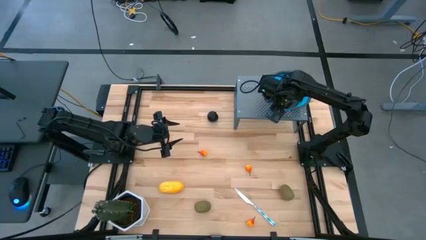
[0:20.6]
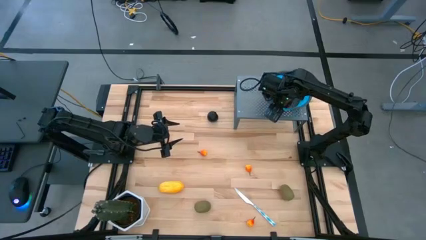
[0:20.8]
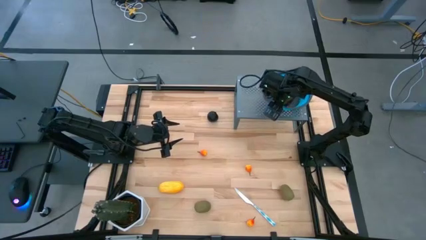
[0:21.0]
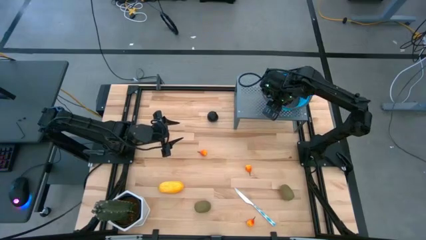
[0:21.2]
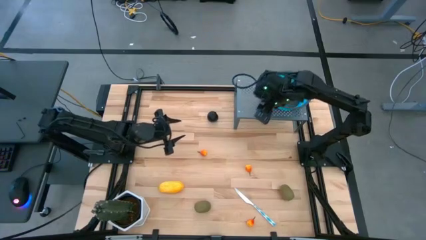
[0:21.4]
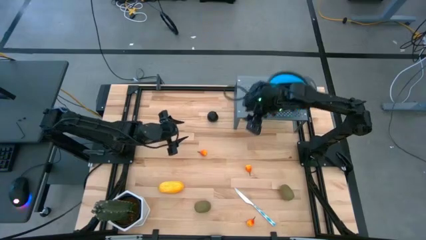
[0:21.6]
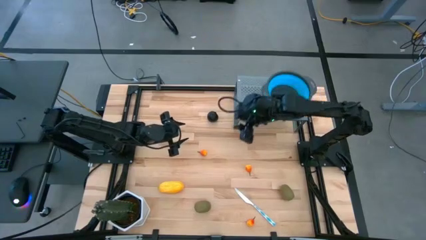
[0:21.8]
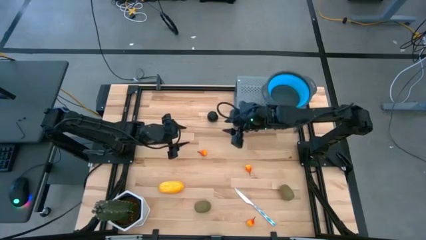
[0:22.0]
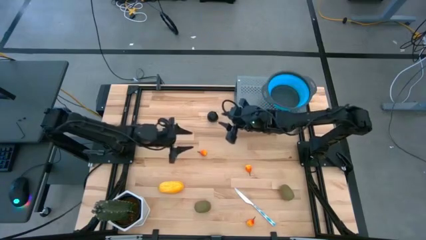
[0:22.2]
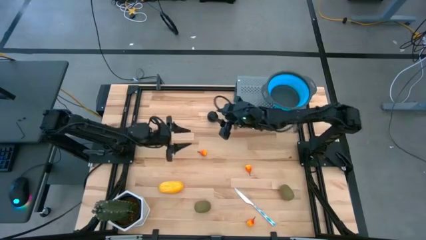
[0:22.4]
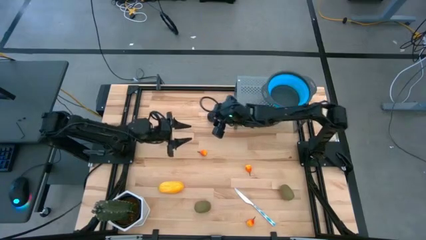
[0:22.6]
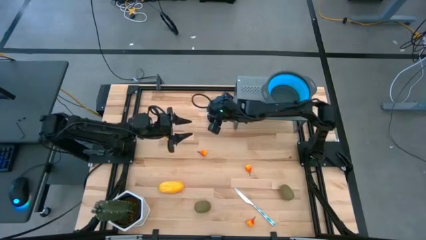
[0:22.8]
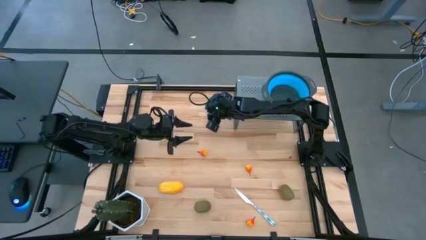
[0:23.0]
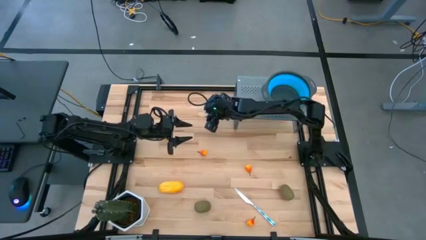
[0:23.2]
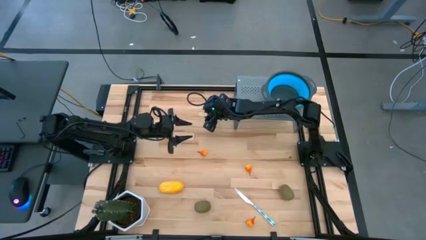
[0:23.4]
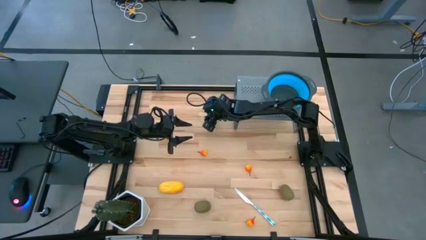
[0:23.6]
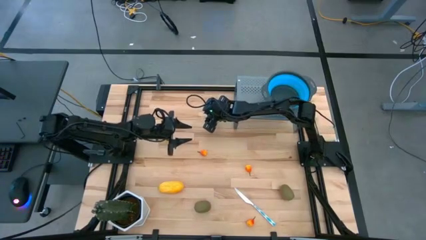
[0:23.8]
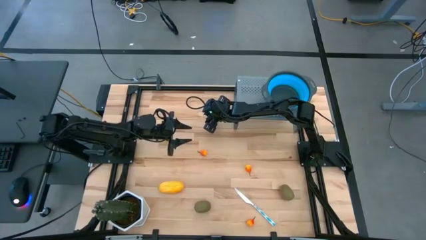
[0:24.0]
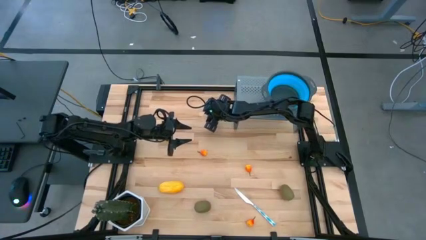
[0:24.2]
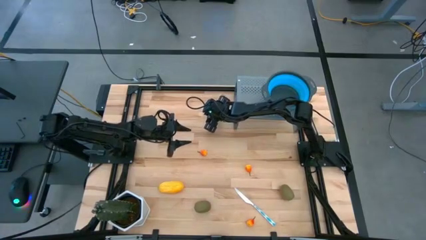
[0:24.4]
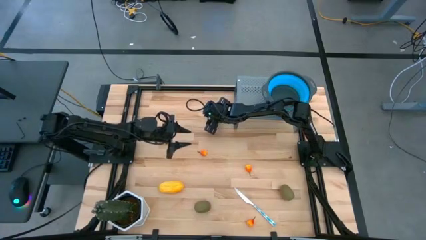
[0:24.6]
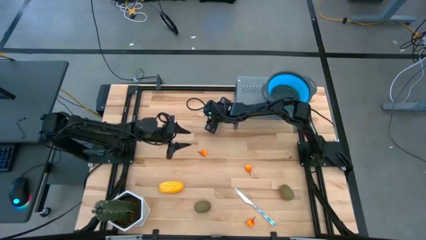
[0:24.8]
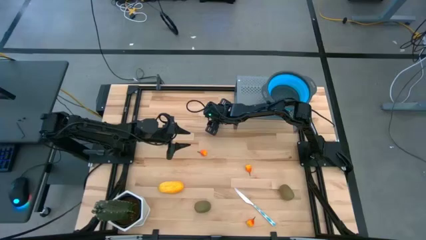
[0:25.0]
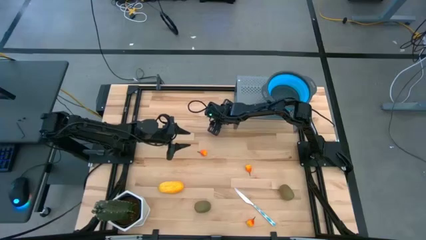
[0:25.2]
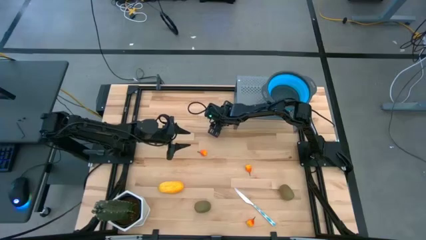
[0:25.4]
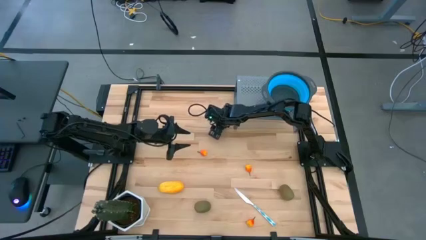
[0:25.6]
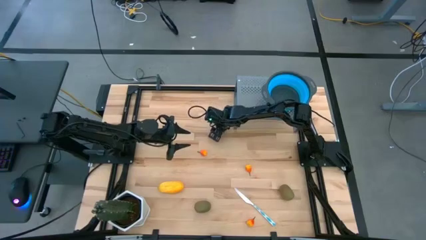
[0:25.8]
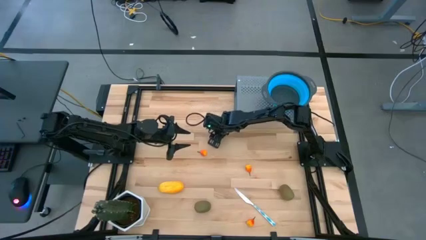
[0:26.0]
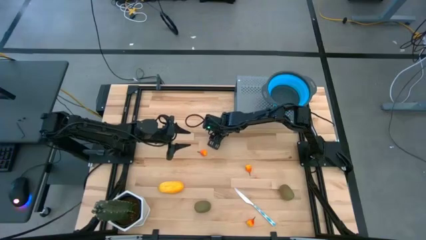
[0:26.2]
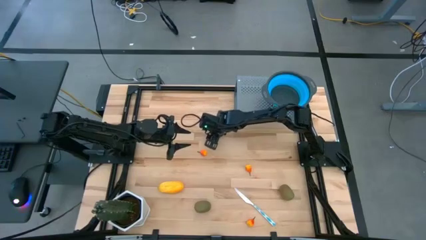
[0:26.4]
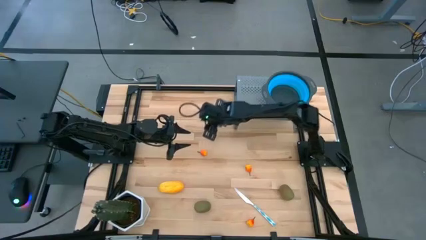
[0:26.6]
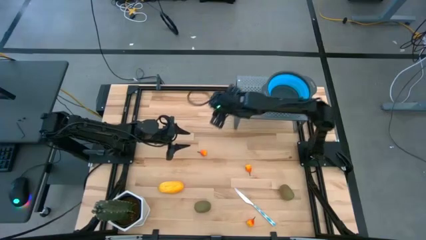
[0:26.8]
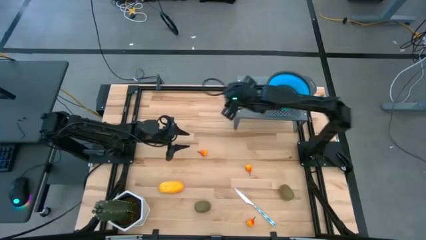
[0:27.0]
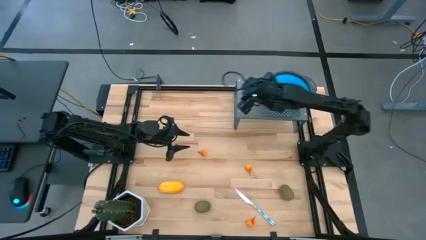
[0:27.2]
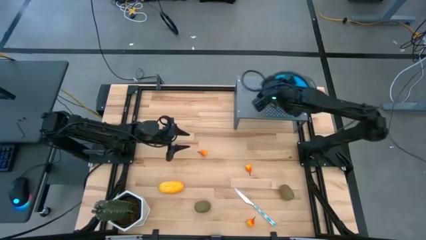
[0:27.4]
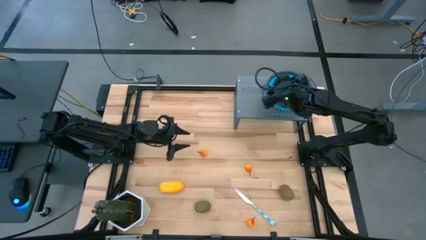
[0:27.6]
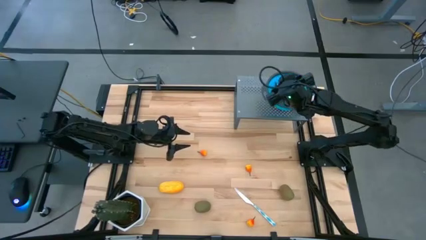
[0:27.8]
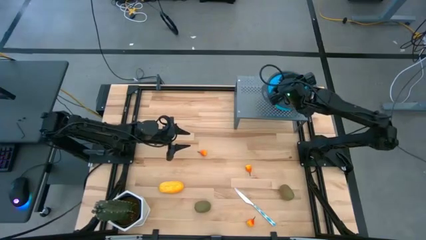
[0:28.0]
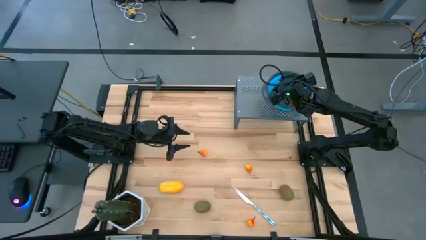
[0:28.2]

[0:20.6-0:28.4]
Task: Pick & Place Fruit
Put the black plum into the blue strainer bowl on the shelf

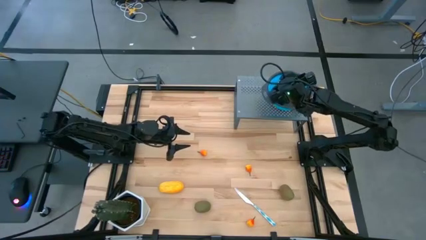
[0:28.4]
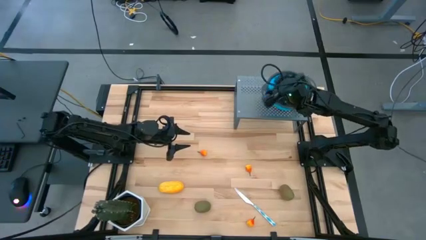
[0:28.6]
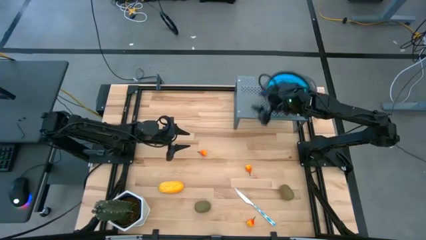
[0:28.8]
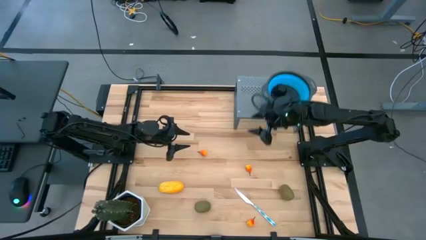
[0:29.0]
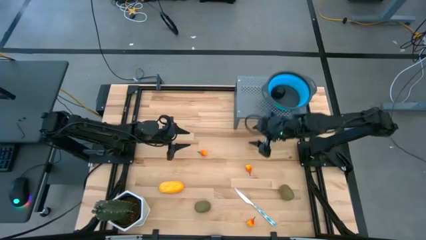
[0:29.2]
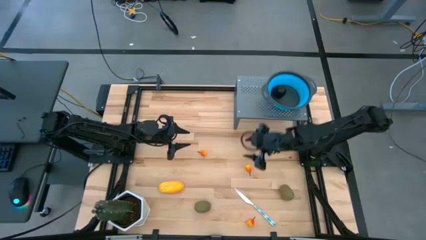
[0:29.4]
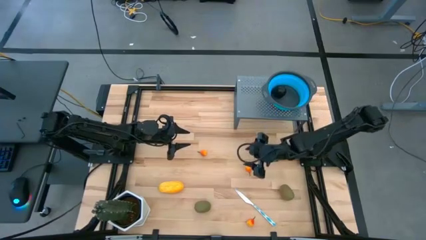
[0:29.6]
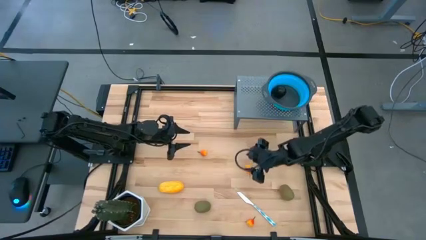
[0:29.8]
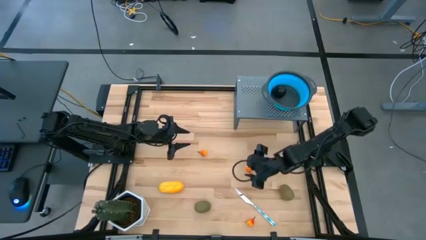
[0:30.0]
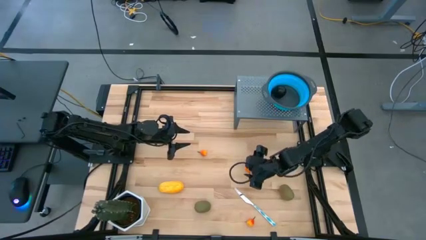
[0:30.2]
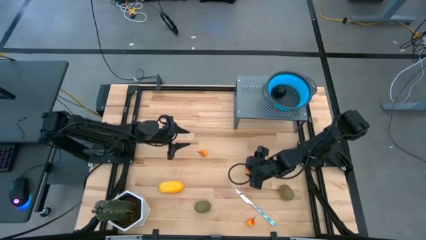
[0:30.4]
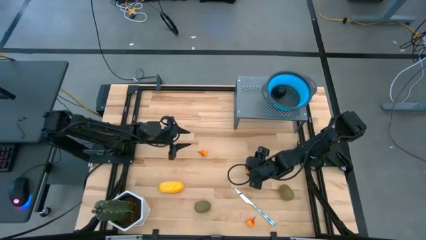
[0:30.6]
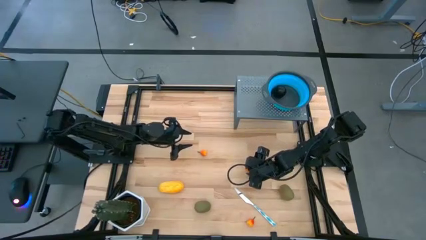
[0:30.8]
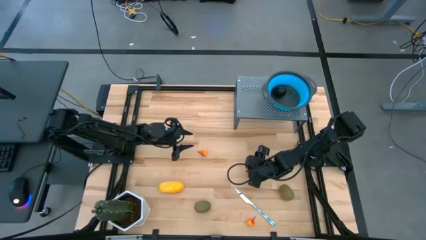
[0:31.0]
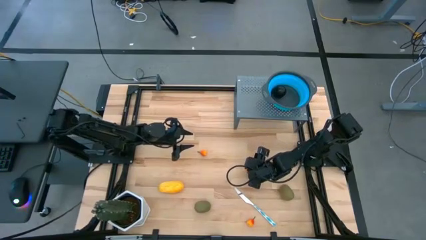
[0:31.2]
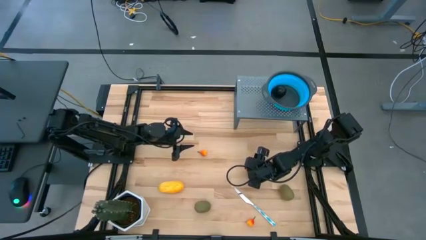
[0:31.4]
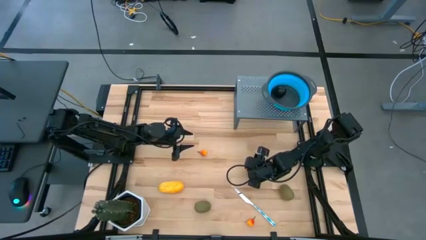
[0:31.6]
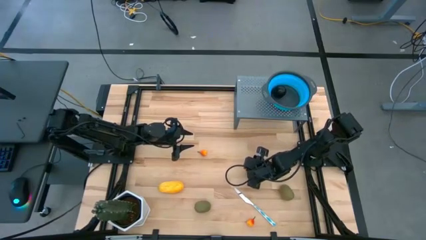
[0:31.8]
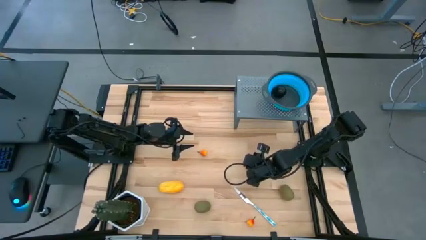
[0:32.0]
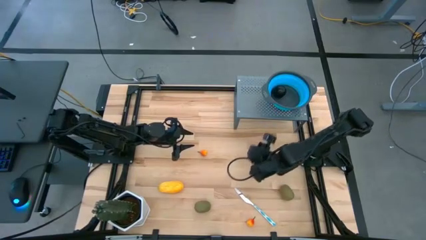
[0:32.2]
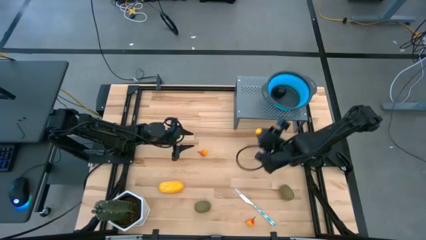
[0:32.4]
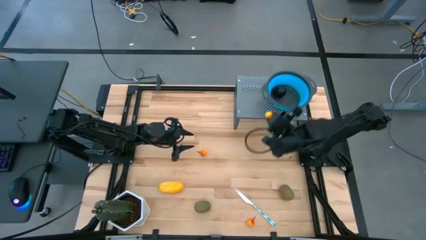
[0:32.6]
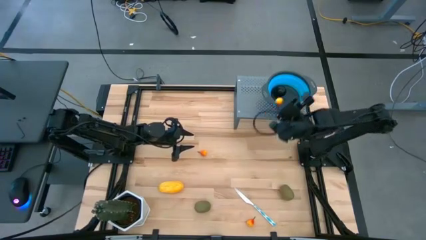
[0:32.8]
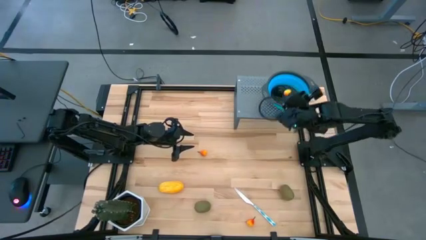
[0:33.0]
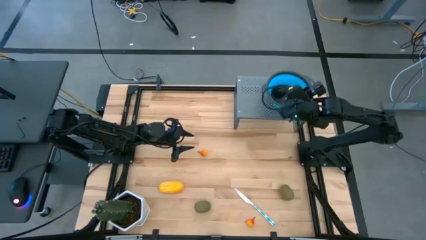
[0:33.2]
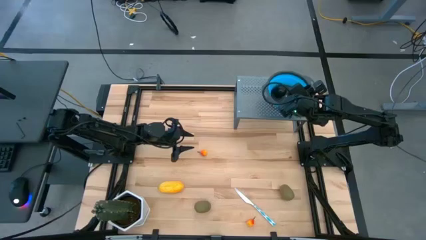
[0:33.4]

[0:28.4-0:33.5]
Put the yellow pear into the blue strainer bowl on the shelf

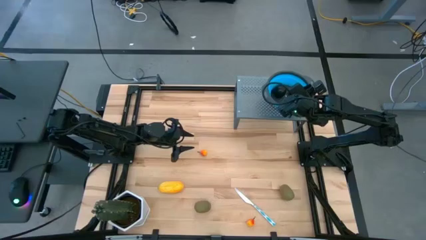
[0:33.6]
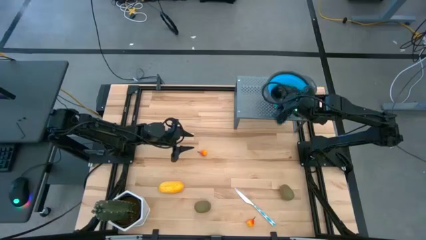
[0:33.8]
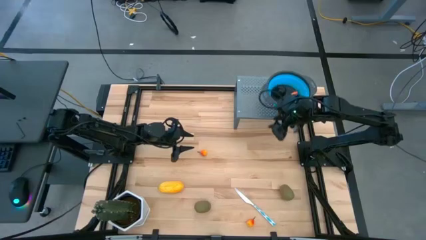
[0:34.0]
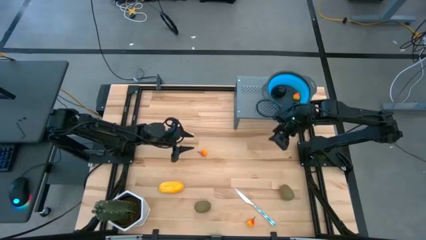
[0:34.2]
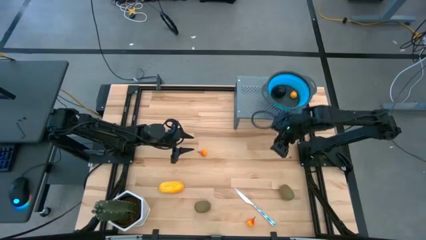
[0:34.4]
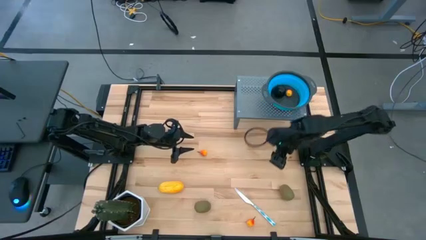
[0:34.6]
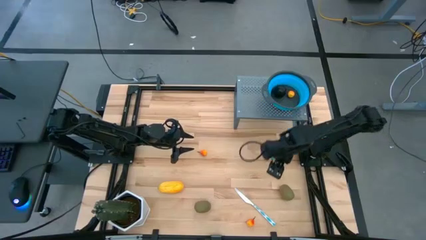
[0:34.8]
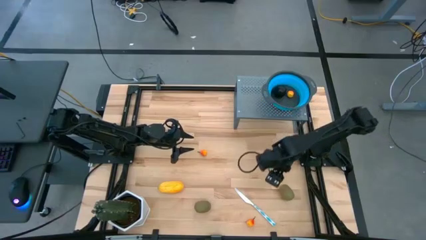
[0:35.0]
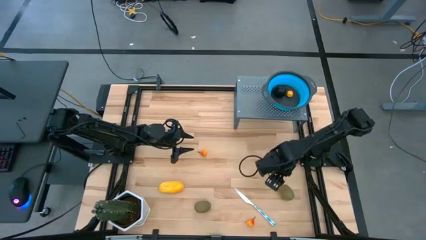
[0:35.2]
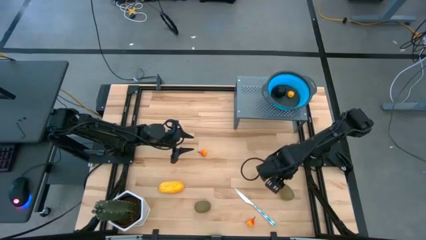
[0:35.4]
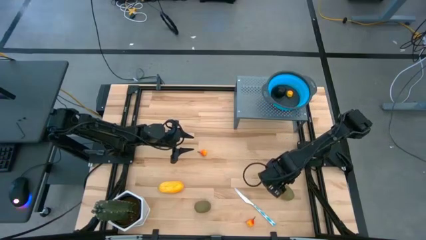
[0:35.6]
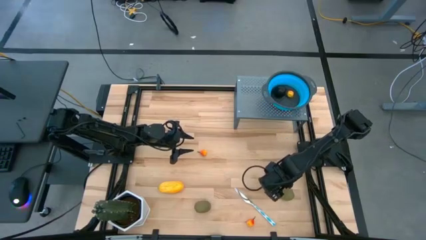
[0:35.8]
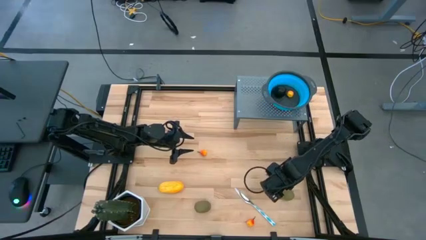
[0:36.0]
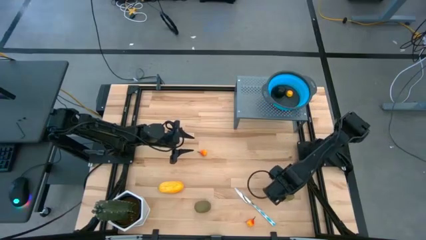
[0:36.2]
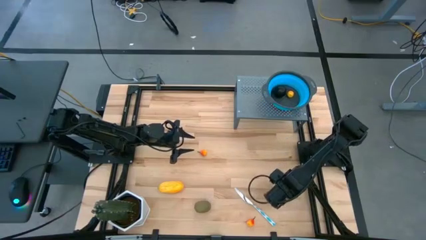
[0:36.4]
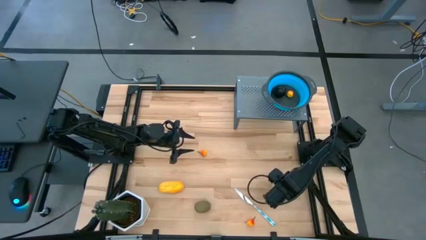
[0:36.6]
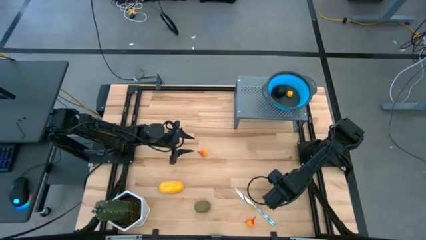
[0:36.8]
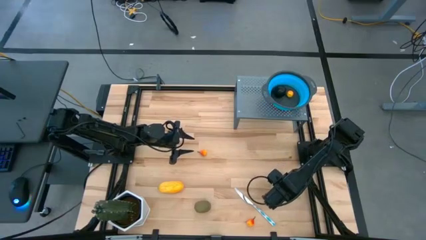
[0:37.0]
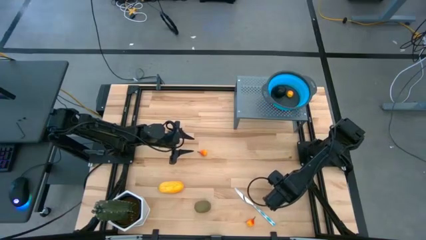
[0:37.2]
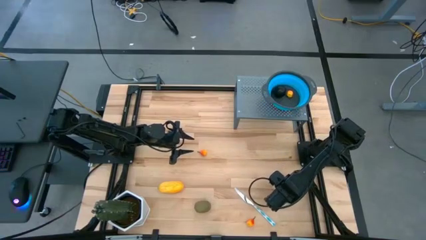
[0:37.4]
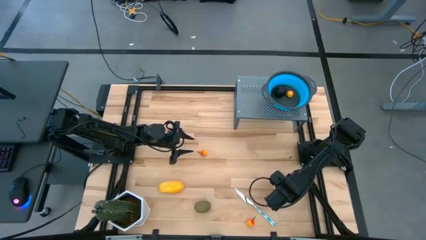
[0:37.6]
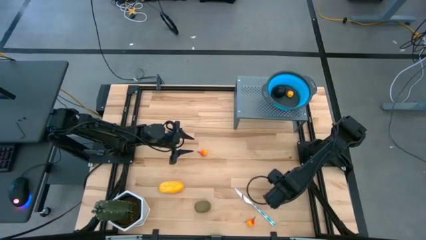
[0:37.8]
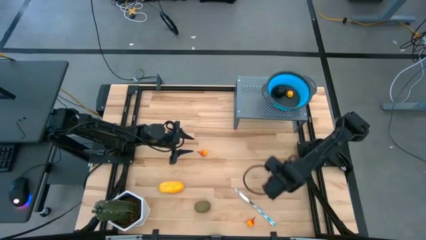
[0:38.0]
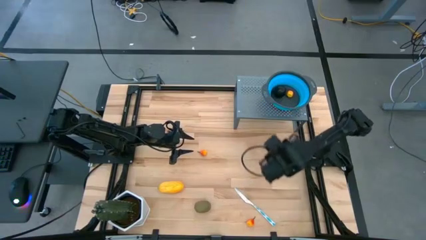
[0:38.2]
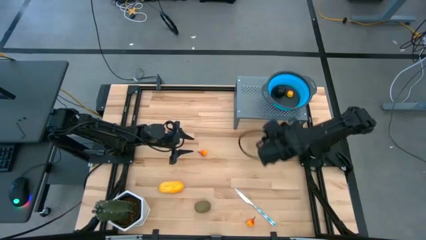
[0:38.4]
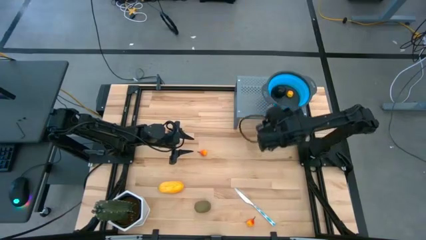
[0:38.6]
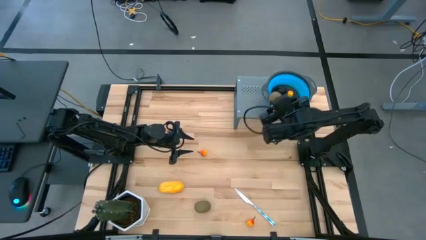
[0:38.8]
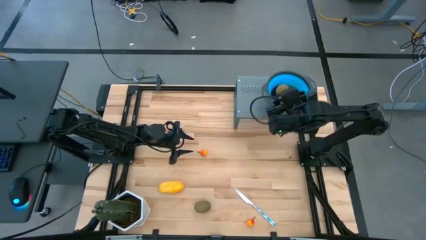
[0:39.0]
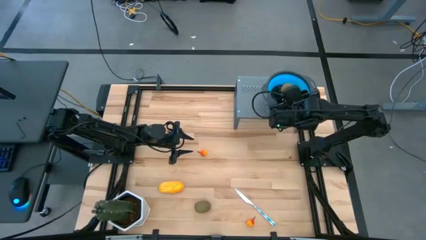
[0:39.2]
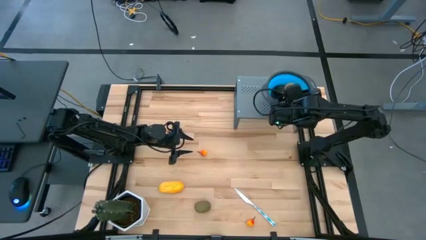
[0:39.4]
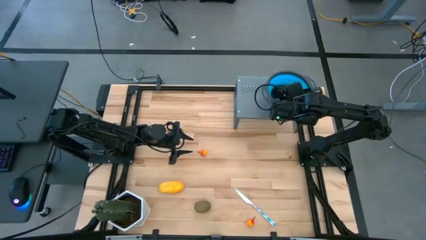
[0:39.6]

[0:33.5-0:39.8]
Put the brown kiwi into the blue strainer bowl on the shelf
